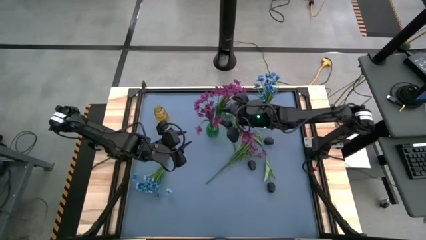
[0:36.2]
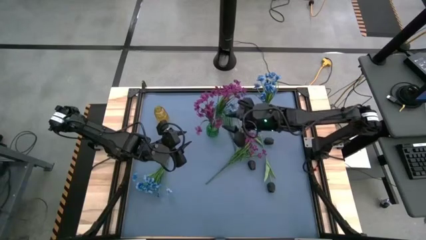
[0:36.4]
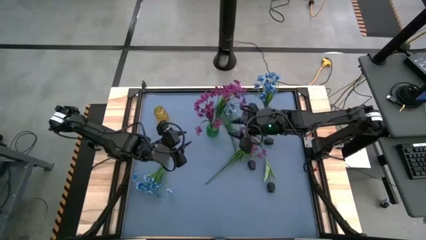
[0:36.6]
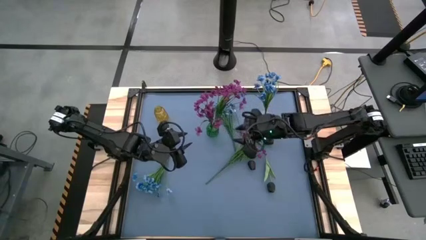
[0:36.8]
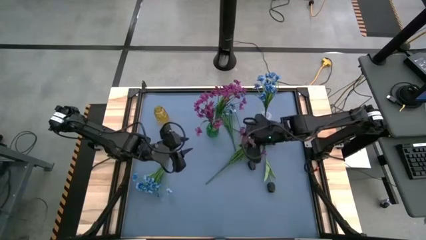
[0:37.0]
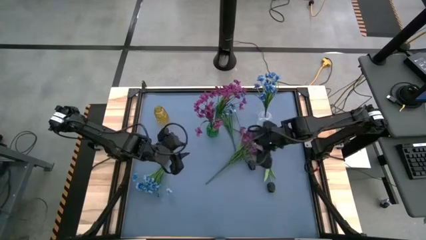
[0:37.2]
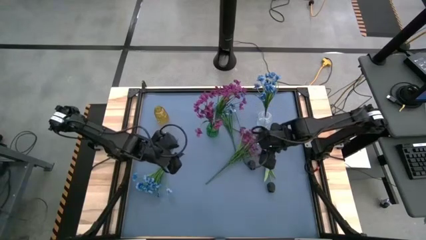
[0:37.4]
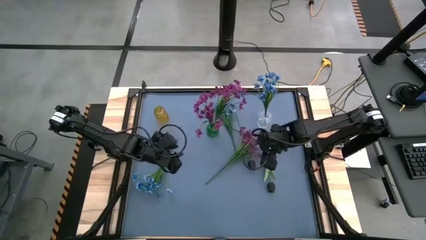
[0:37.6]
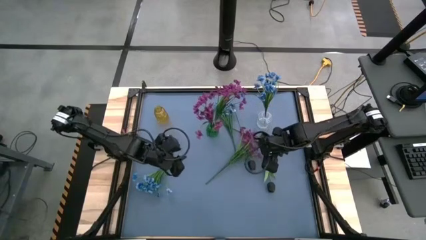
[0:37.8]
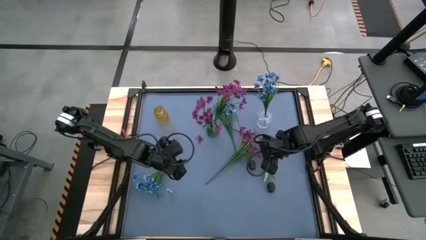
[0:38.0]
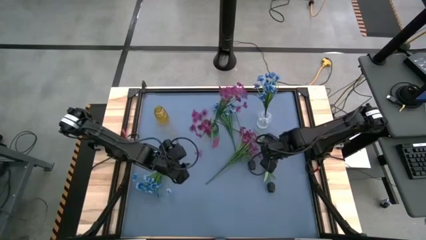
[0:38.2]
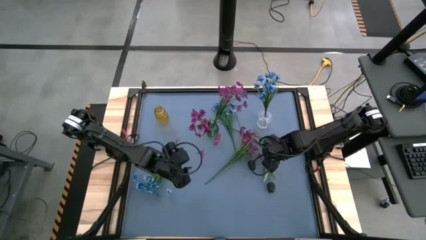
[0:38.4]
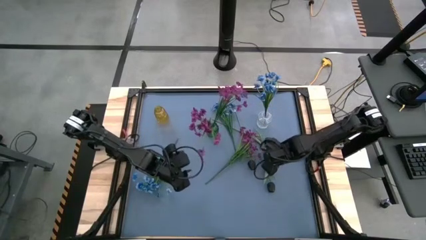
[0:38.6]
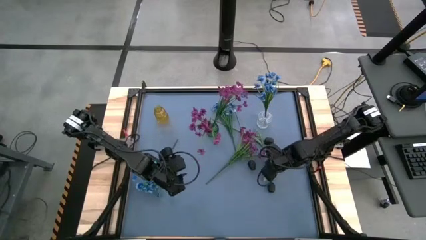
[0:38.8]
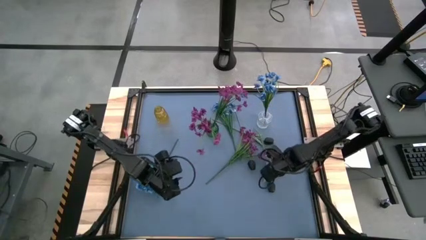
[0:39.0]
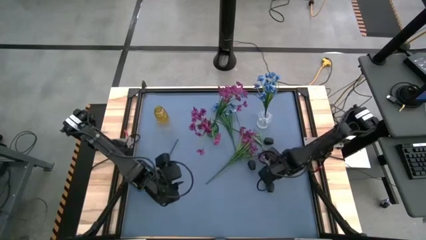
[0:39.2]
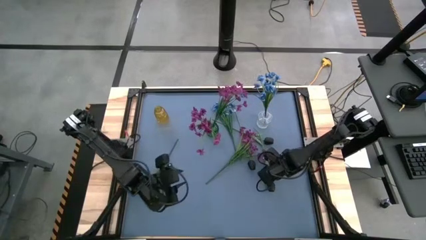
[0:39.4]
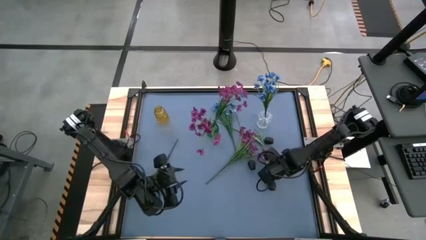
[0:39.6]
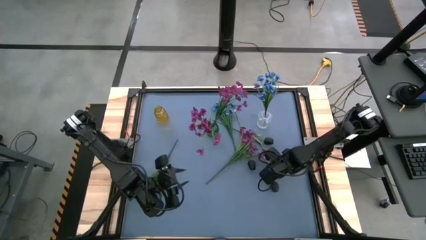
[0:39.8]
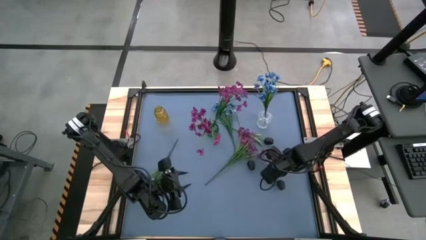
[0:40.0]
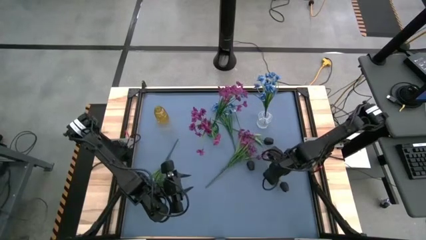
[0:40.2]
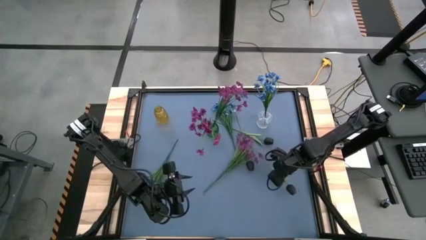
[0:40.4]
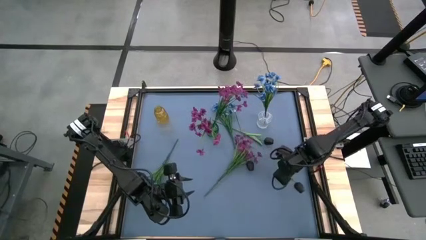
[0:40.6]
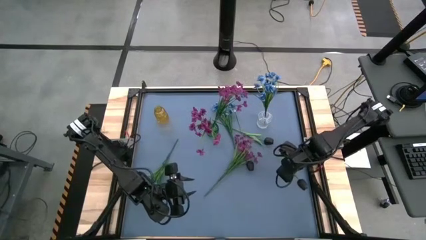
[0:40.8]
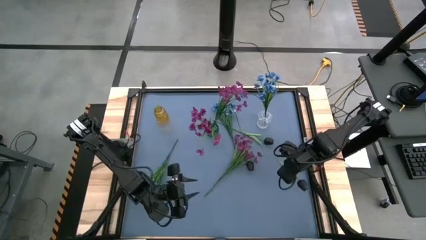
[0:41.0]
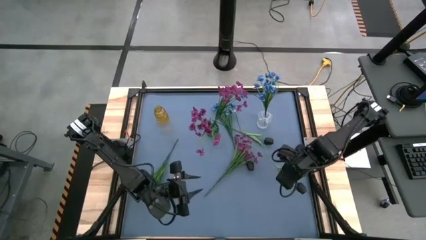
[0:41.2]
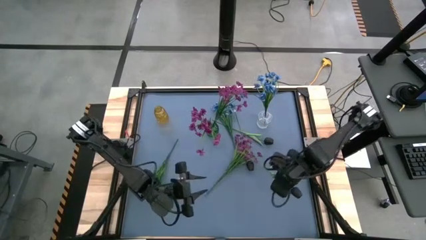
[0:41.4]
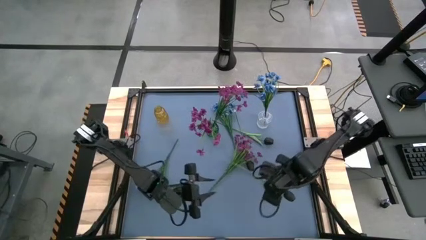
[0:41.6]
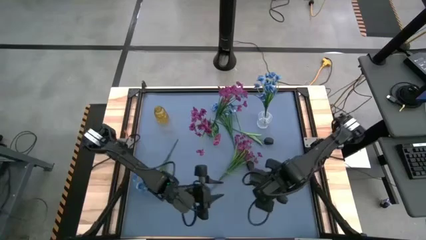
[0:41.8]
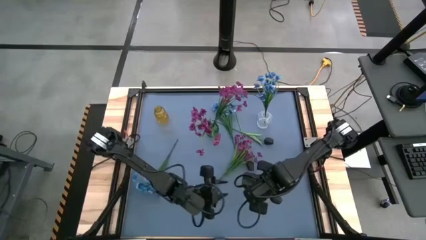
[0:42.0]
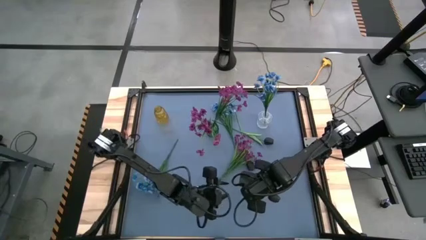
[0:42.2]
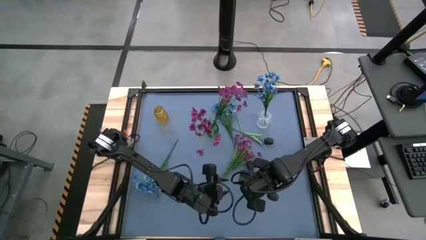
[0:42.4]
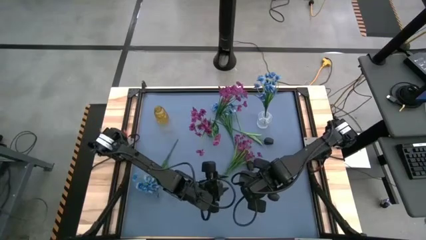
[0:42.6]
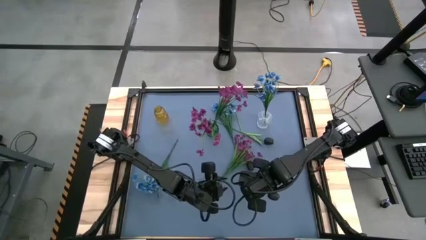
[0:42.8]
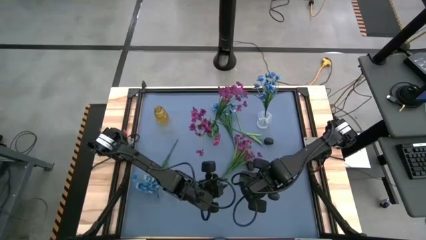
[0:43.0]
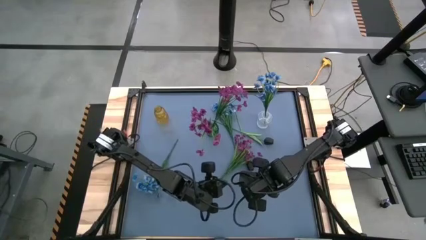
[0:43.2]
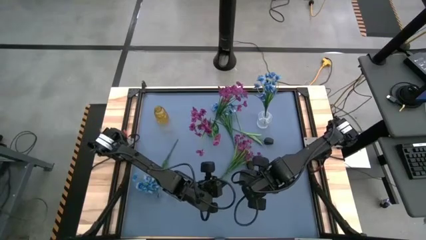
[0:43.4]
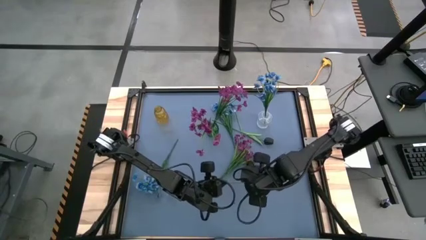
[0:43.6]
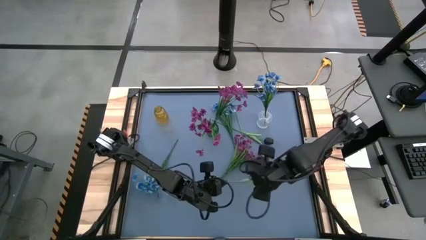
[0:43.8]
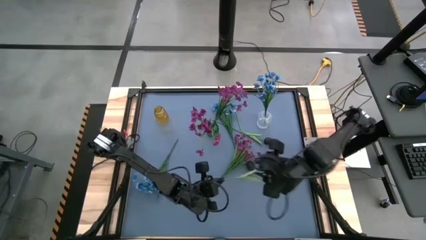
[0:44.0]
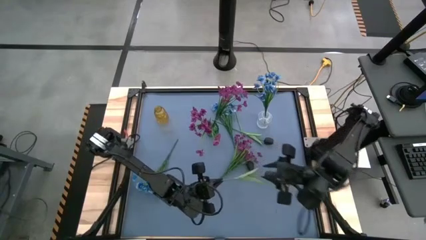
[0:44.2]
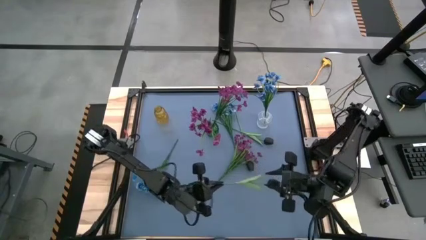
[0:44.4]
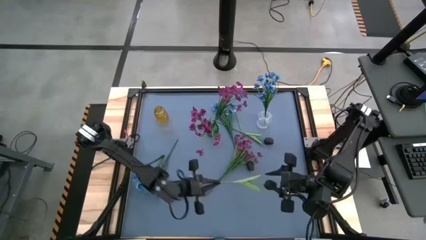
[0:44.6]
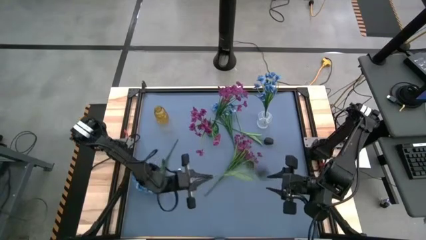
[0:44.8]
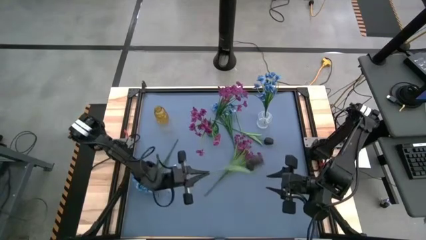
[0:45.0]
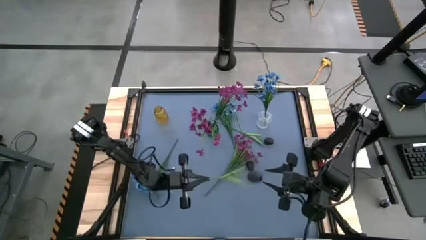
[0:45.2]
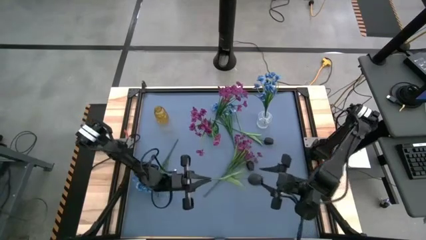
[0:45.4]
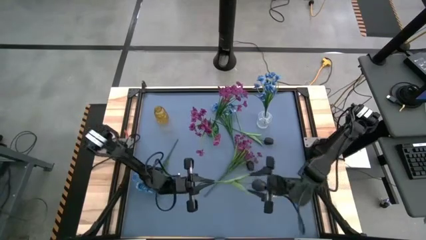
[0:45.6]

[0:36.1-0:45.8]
Task: Sort flowers into vase by color
Put the bottom black tulip into the yellow vase

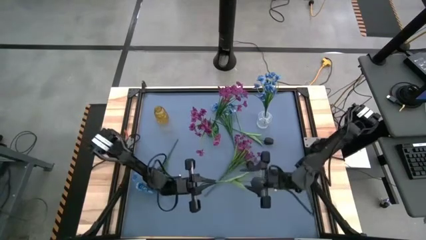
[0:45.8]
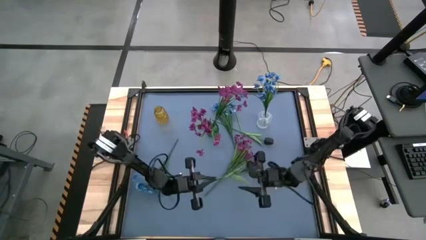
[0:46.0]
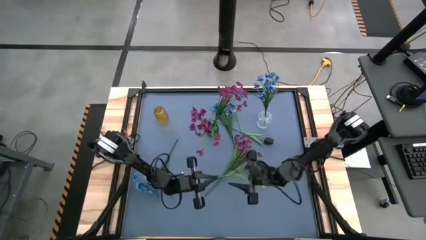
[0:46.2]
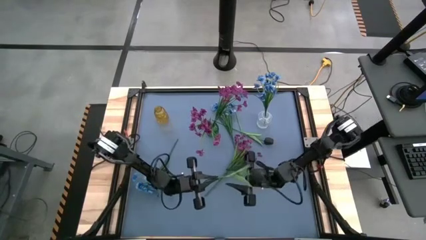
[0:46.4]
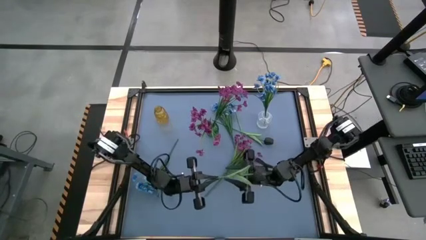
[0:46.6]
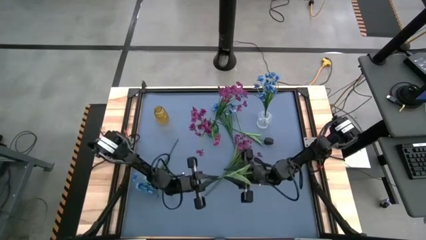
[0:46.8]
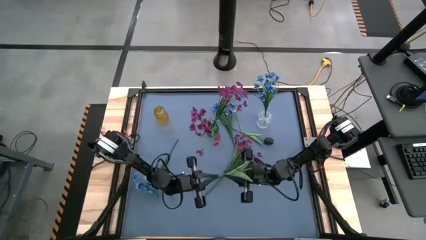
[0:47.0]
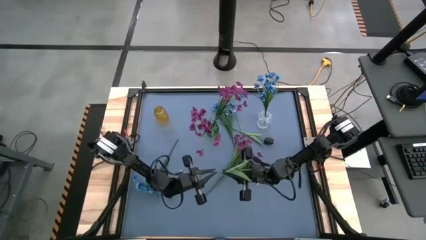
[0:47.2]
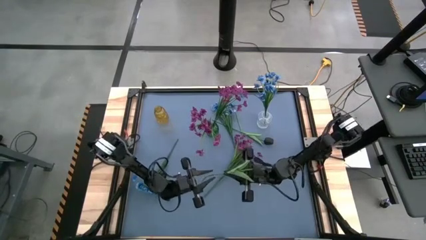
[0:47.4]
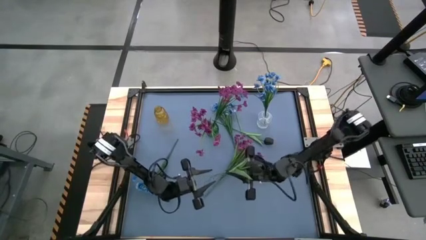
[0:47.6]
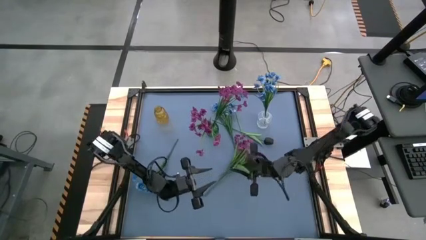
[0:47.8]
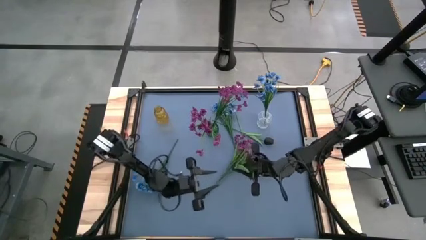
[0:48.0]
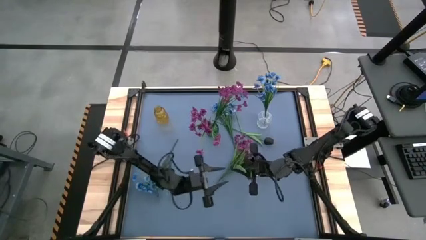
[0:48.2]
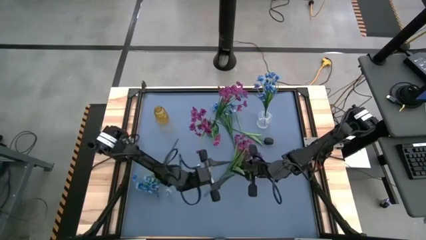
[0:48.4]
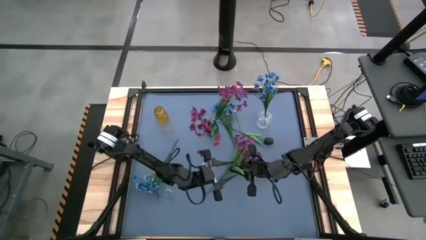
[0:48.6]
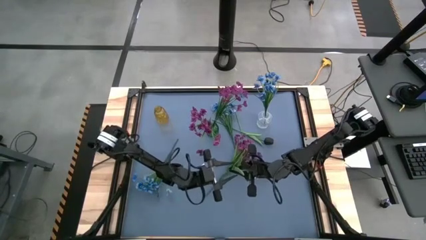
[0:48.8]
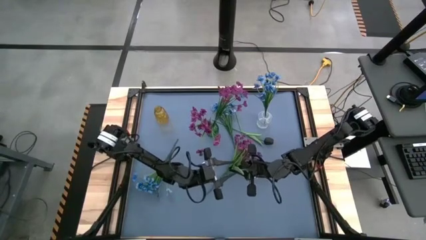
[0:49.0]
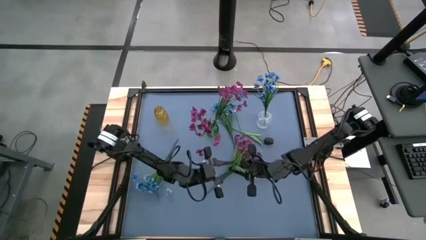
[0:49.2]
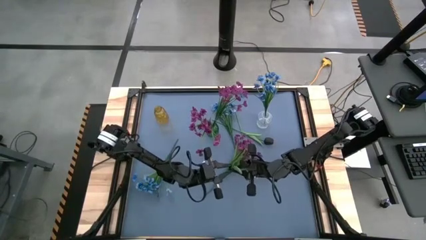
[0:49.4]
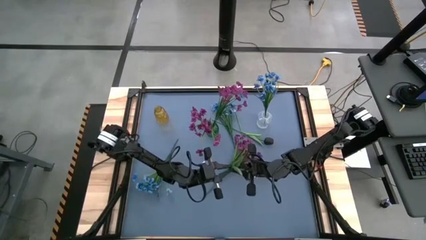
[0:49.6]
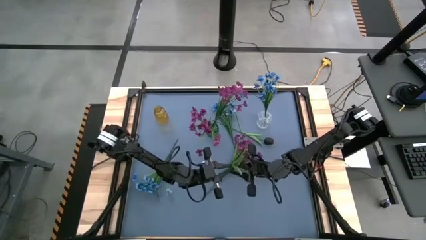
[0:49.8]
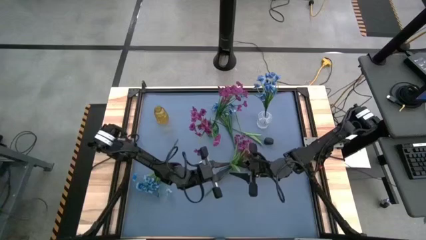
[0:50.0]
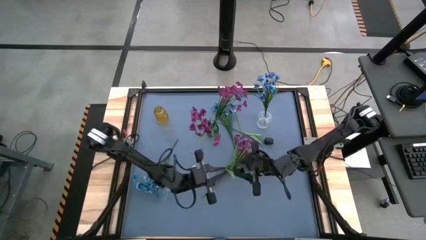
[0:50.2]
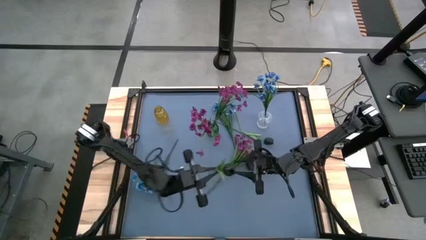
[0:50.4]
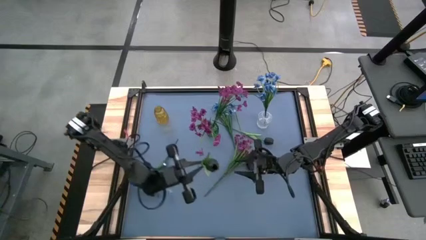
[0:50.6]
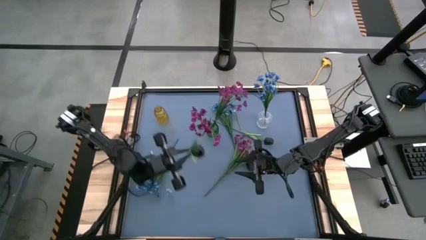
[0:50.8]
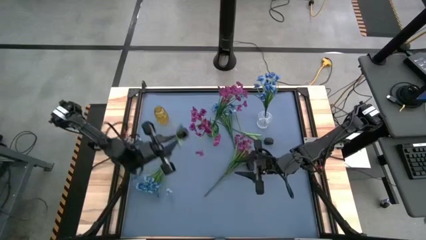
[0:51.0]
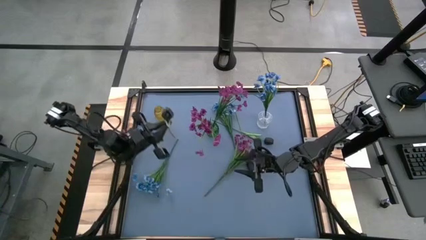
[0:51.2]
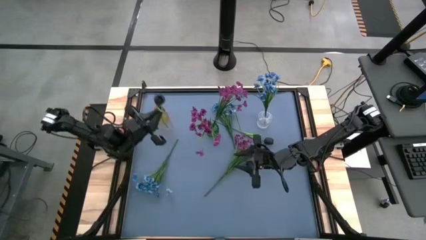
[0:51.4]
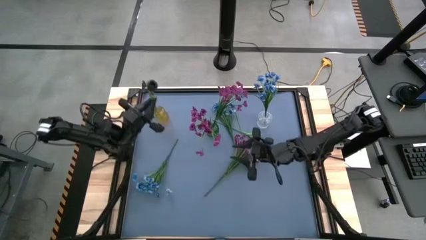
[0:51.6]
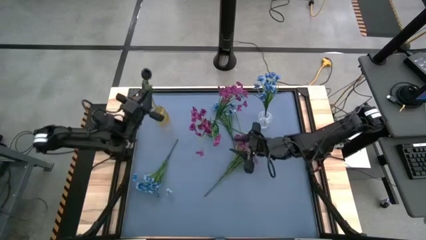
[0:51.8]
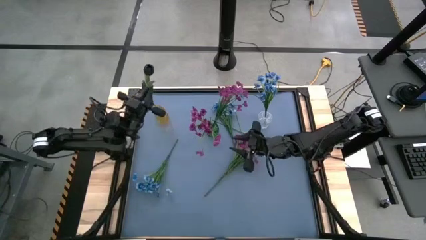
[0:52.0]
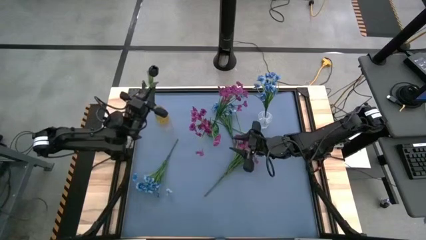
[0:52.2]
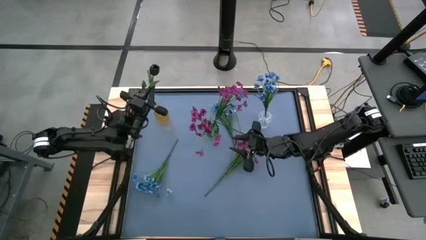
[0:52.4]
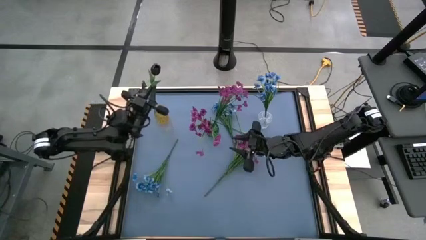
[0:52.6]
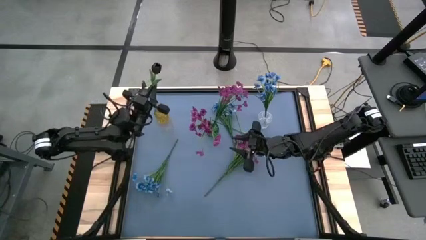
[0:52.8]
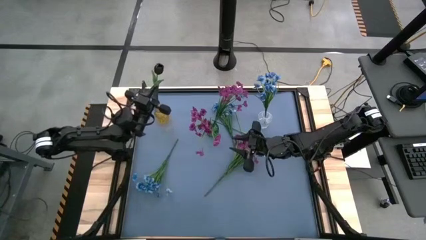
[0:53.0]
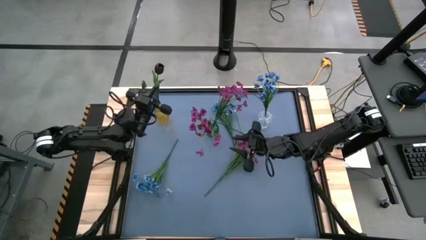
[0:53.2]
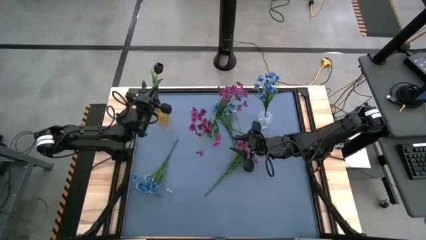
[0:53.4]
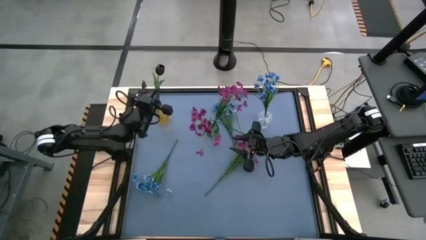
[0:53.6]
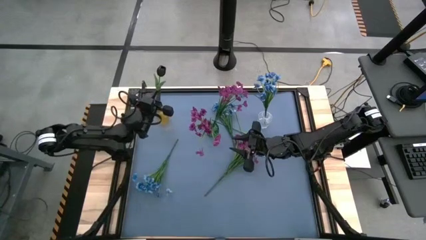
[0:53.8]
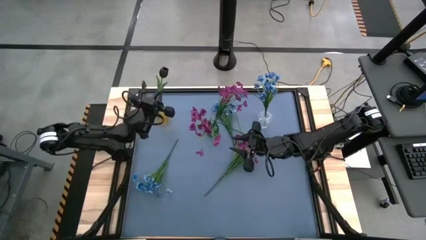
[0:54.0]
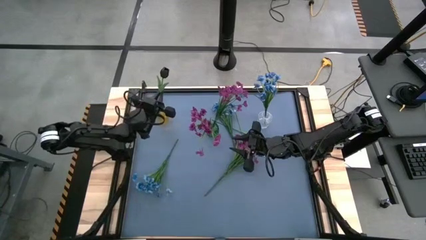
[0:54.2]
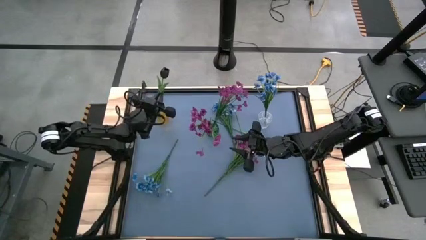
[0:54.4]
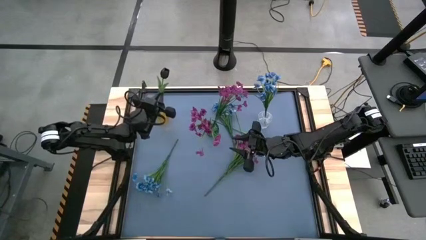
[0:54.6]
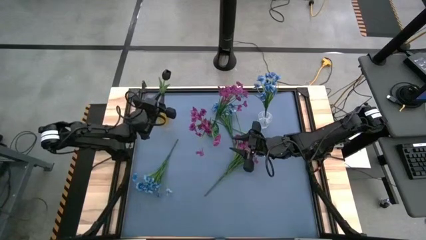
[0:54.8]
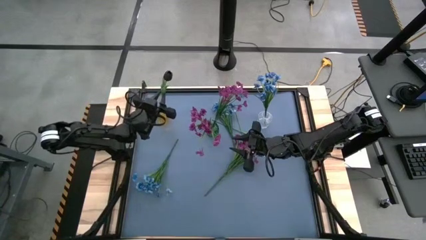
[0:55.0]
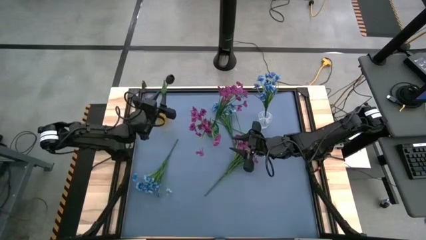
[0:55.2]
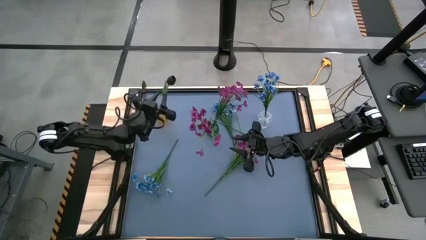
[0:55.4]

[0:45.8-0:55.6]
Put the bottom black tulip into the yellow vase
